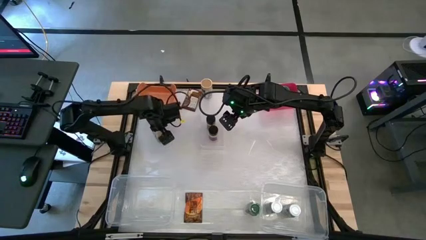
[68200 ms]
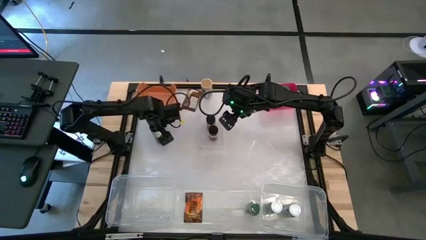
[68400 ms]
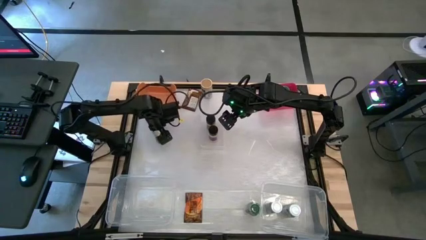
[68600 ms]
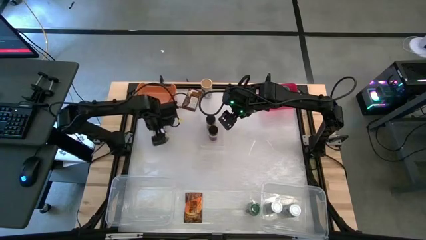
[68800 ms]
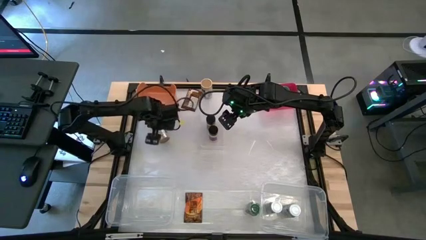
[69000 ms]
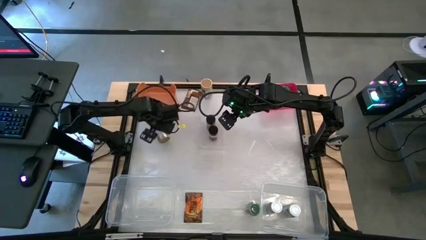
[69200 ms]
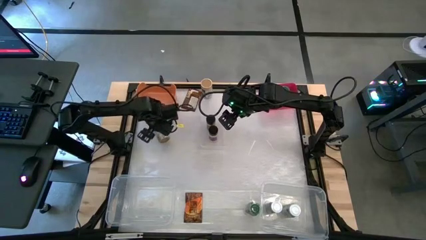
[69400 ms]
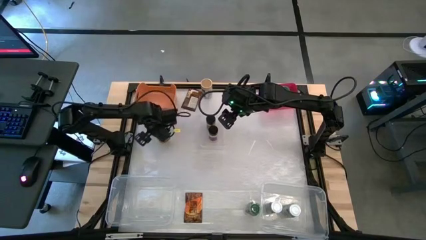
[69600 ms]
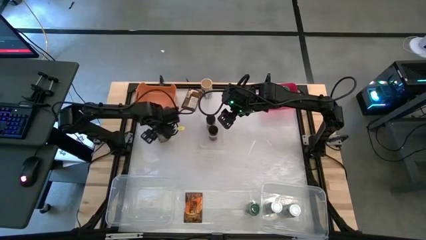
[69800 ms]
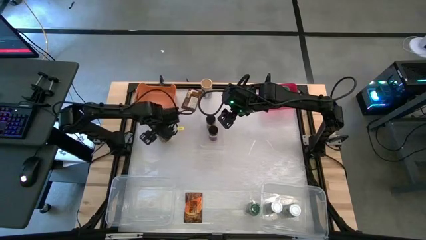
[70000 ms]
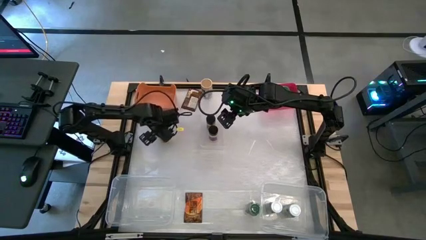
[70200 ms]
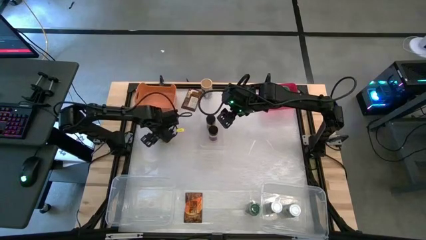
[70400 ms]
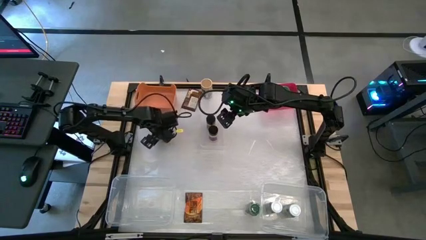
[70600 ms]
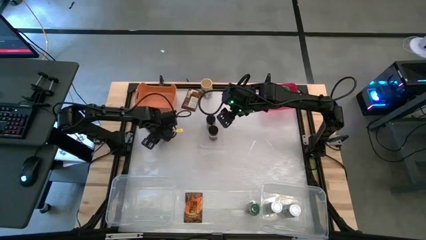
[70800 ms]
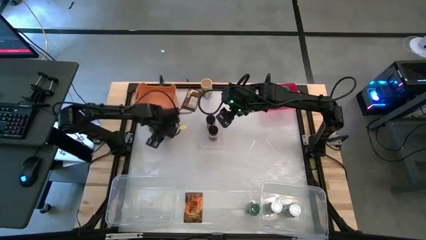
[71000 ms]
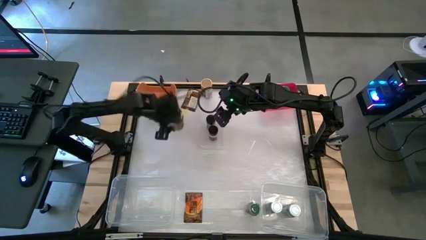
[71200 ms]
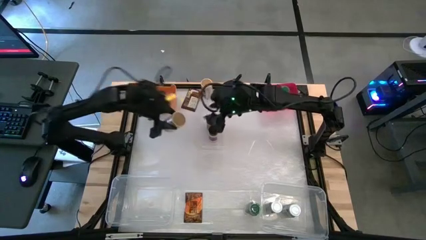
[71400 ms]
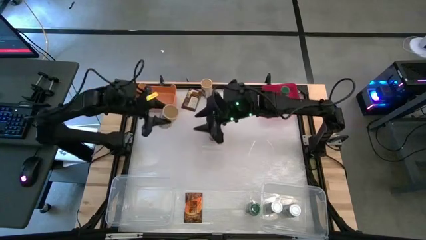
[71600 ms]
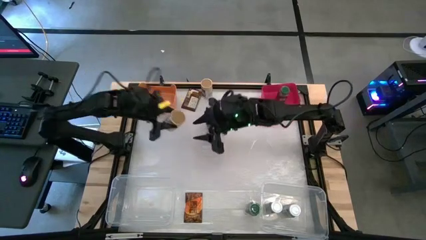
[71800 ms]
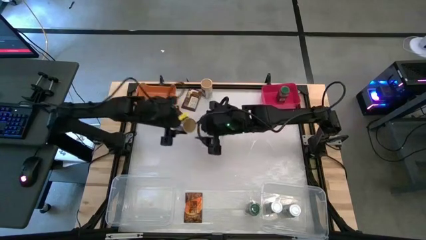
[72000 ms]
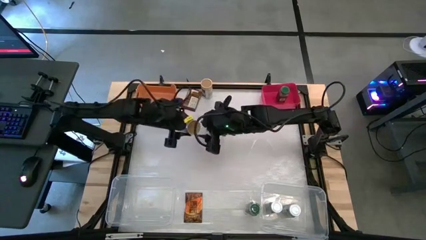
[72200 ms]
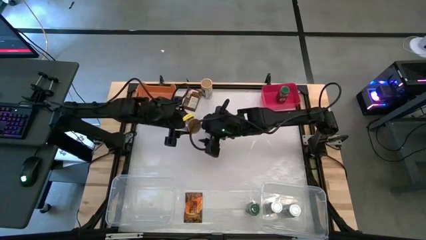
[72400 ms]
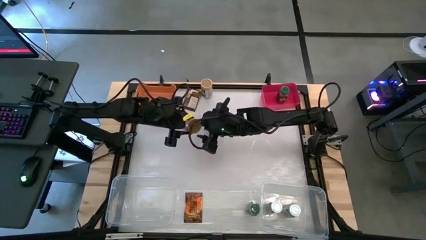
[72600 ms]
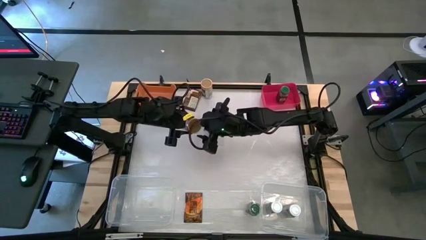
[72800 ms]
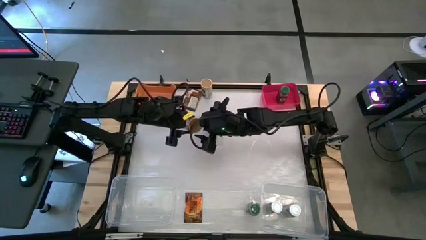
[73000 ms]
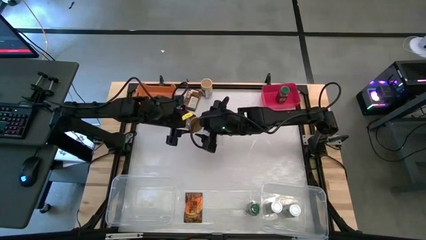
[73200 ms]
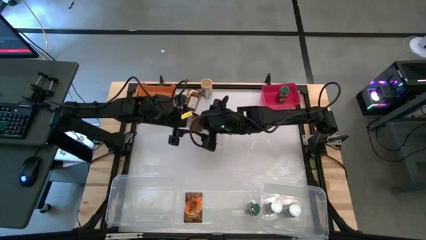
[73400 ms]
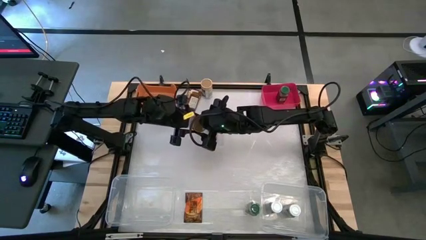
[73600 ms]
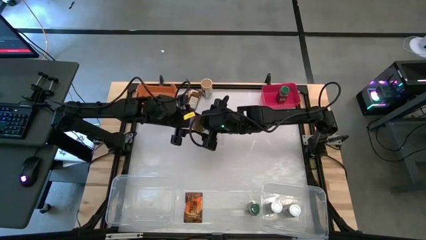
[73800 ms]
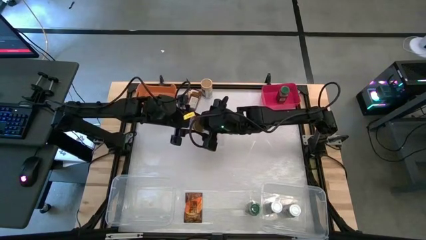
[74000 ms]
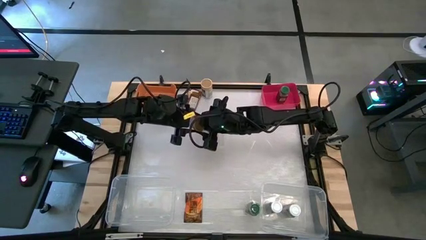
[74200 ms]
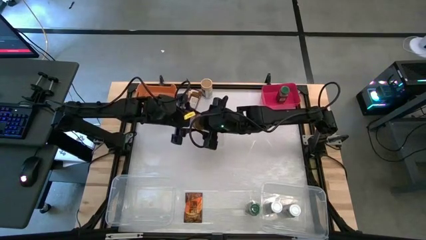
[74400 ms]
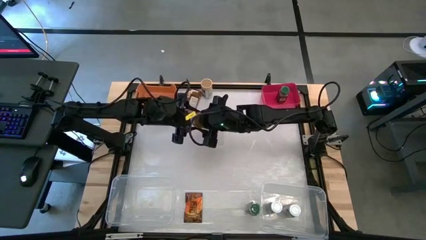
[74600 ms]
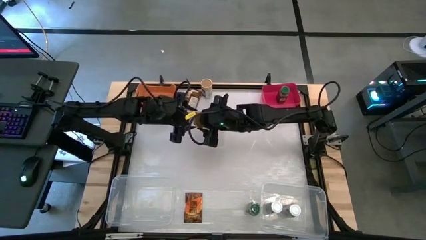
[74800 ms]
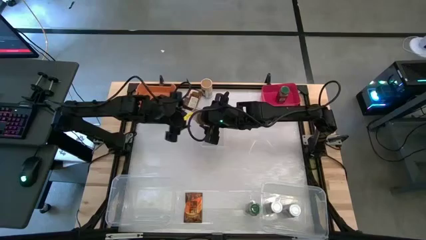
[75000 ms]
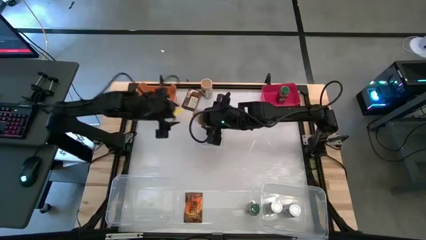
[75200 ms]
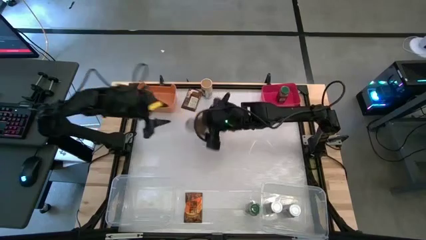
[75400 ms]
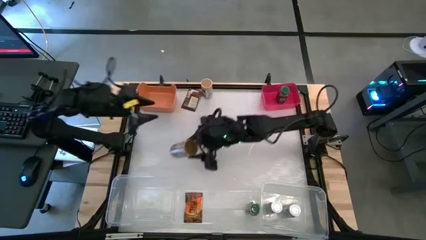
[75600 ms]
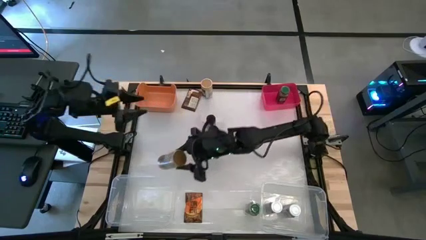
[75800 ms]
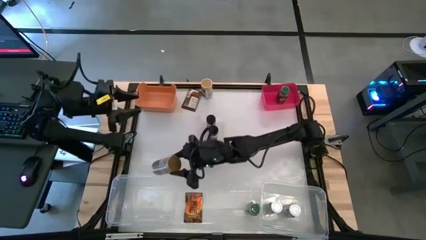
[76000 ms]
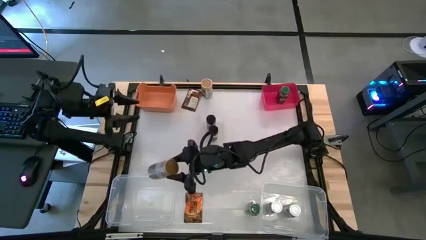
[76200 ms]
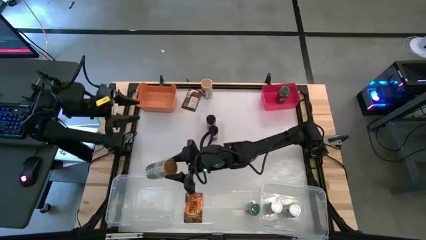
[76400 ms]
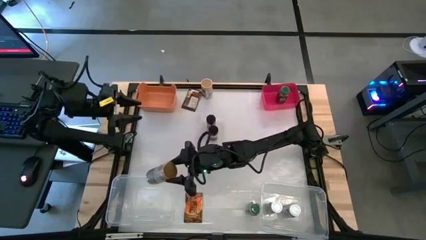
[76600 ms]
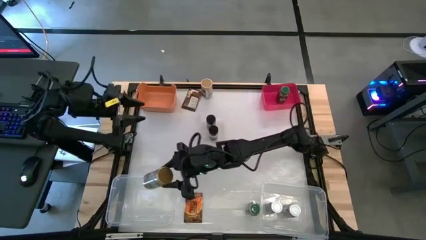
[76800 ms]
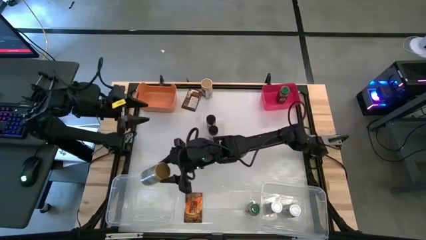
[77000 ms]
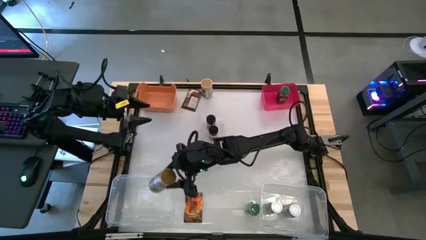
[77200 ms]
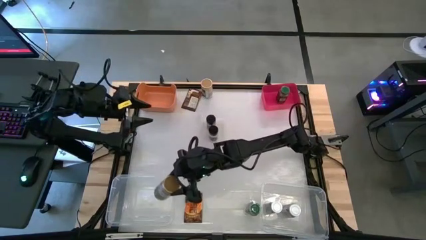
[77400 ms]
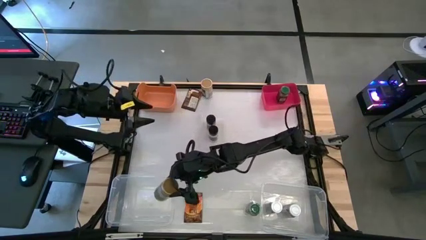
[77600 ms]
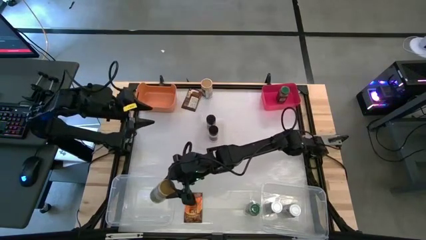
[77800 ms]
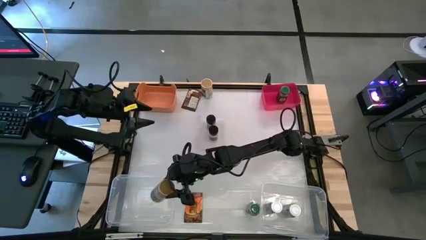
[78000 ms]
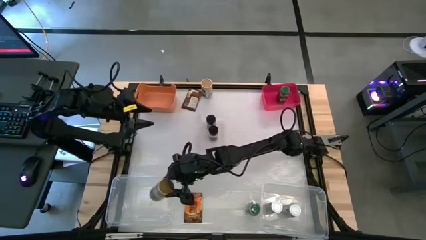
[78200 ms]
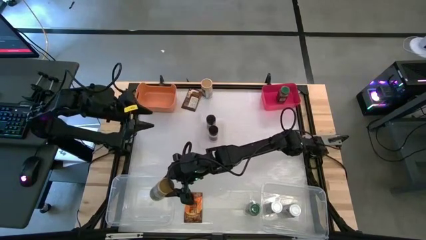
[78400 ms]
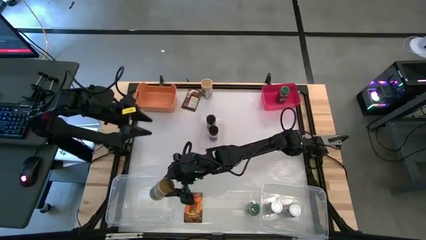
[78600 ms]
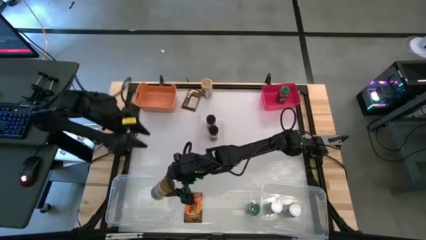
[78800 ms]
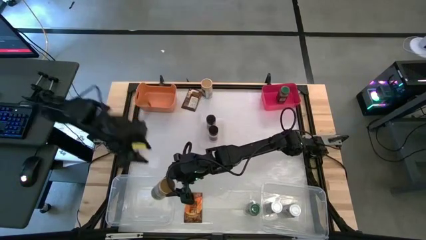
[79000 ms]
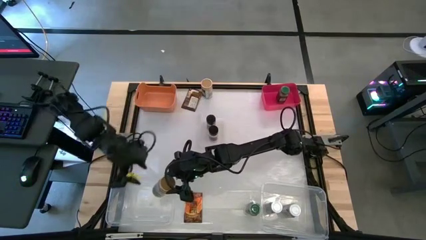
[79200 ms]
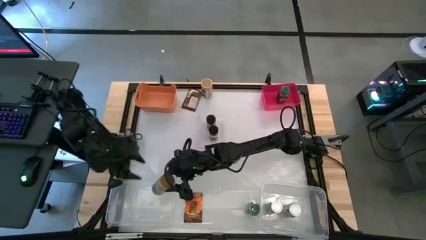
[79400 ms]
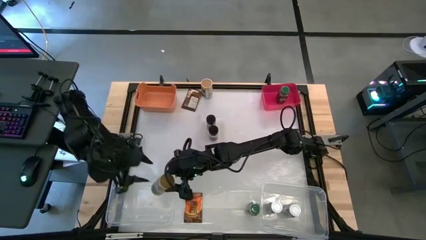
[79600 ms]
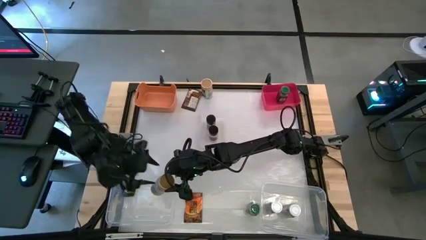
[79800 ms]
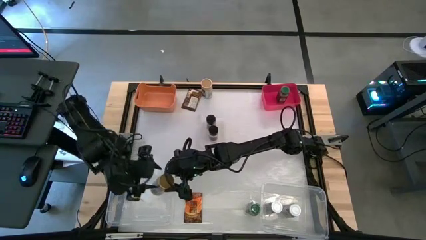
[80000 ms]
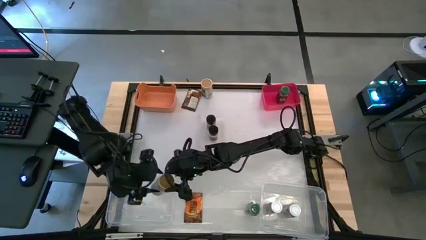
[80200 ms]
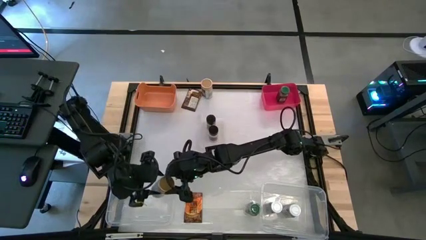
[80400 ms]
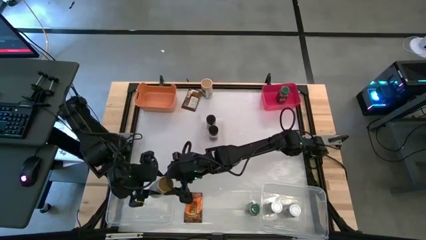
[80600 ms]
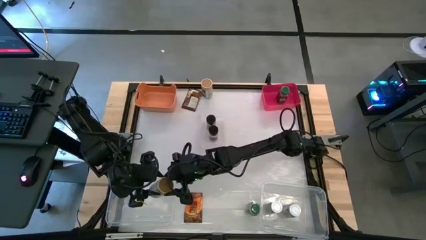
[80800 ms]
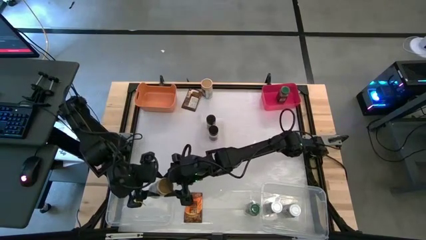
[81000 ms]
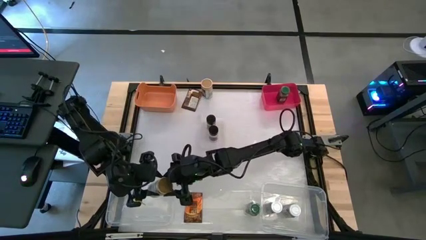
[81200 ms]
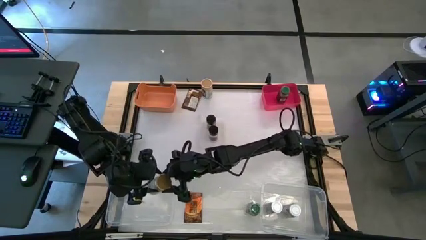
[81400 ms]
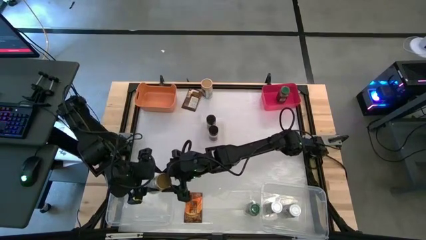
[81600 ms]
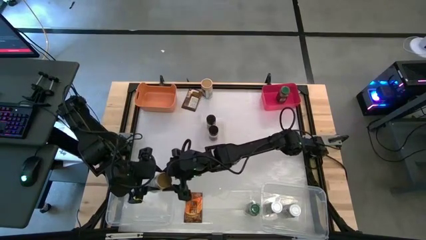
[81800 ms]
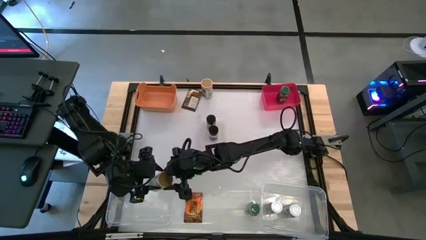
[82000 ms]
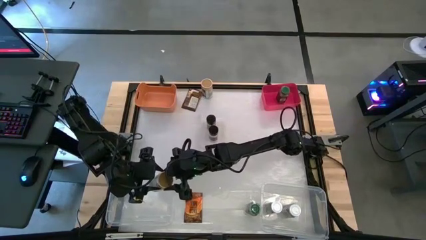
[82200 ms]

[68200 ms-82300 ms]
Task: Sort spices by type
Put the bottom gold seasoning bottle into the left transparent bin

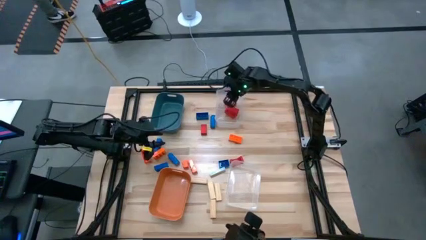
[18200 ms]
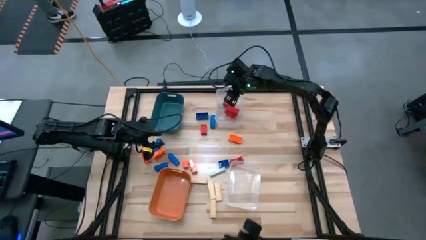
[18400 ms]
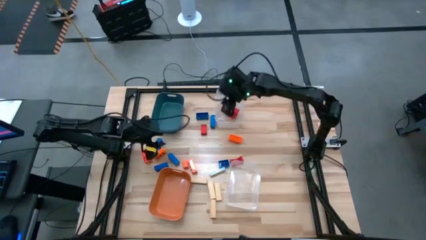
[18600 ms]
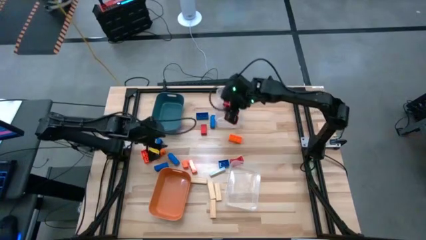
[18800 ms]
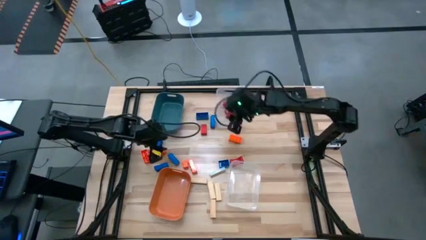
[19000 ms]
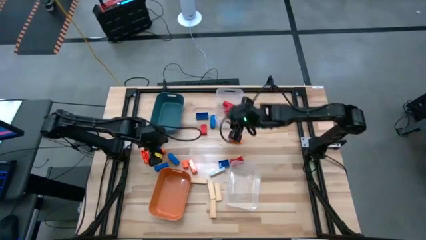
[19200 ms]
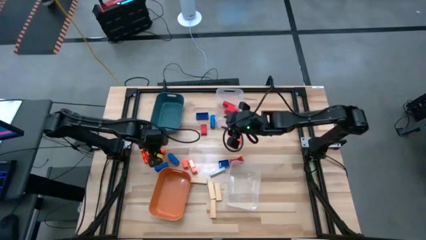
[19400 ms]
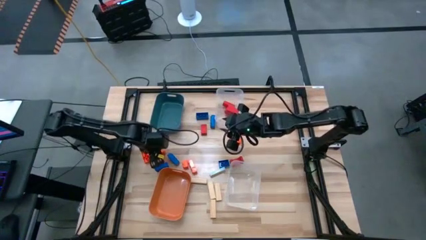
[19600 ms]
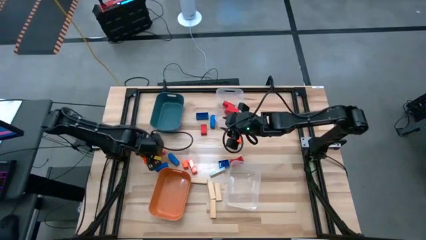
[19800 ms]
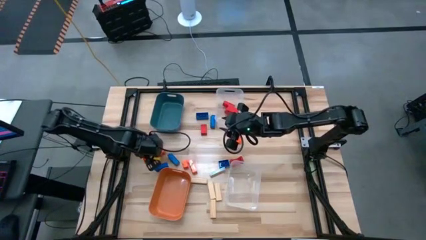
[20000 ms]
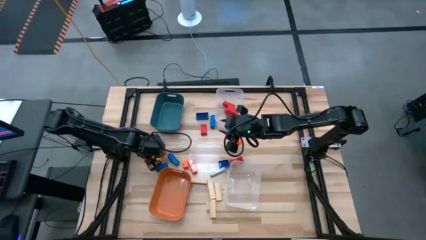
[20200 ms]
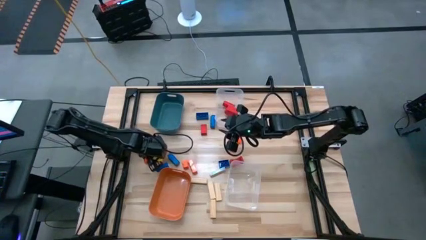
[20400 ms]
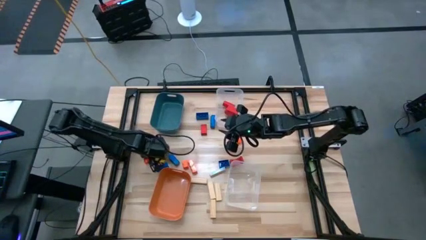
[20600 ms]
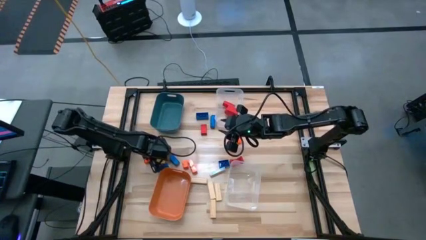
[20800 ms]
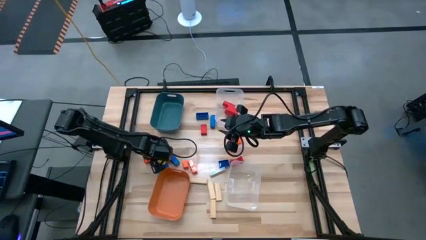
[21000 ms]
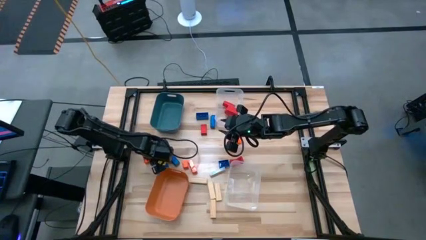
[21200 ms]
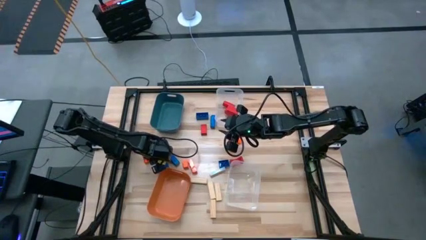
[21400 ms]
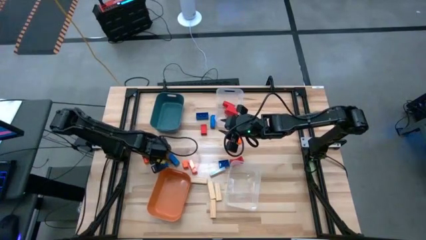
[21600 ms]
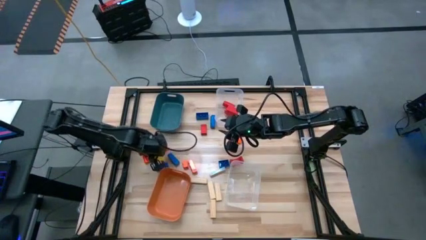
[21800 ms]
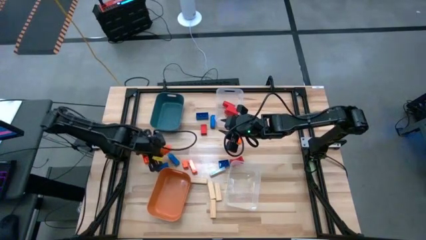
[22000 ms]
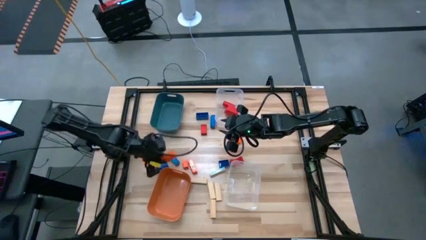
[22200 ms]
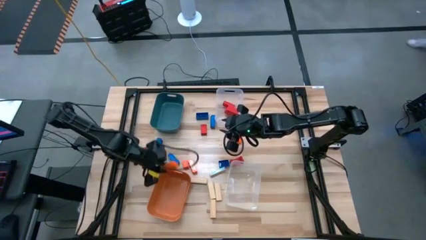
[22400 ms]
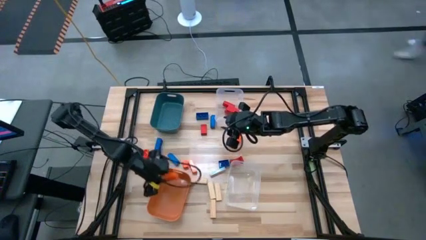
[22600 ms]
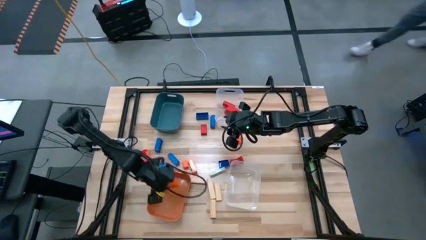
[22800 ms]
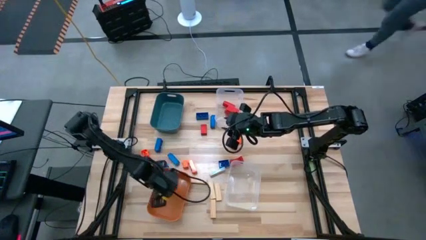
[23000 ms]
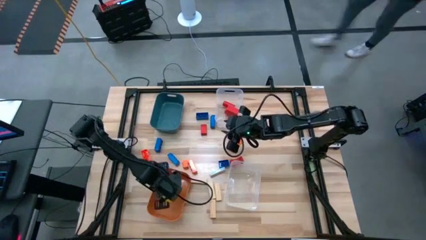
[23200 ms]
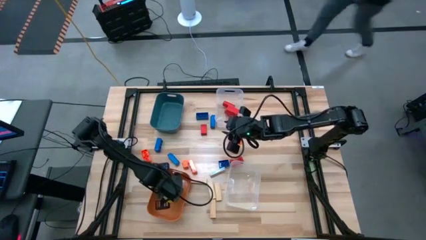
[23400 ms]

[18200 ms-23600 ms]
Task: Sort blocks
Put the orange game piece into the orange bin
